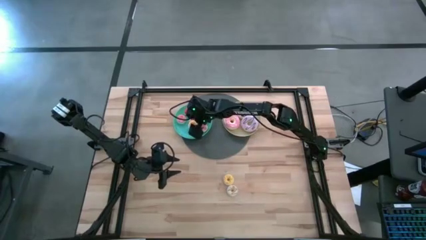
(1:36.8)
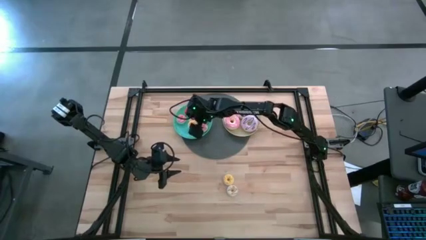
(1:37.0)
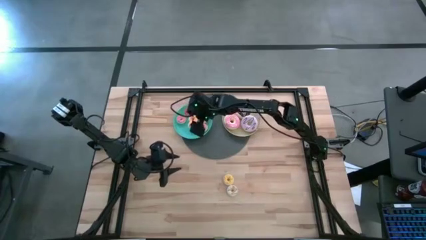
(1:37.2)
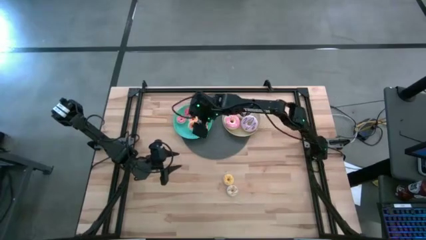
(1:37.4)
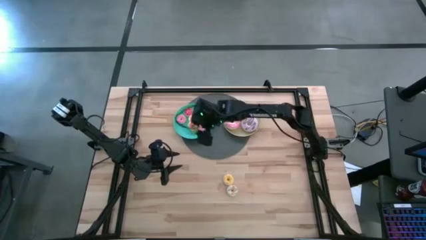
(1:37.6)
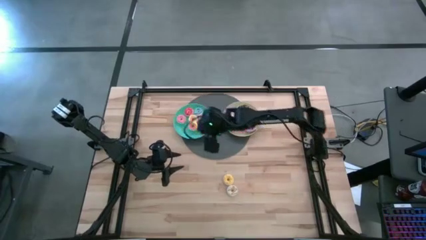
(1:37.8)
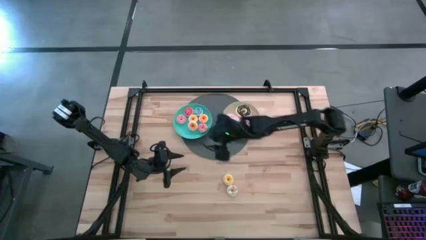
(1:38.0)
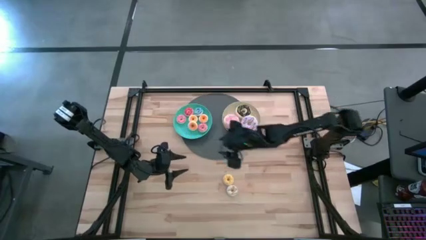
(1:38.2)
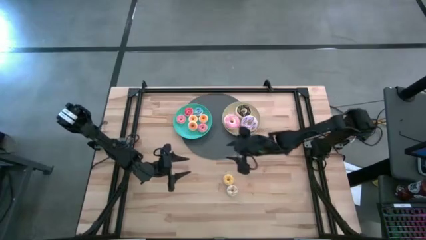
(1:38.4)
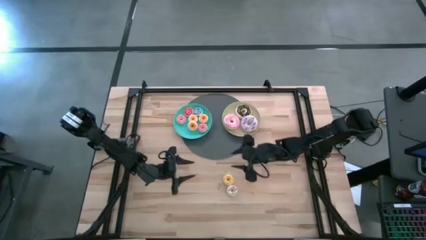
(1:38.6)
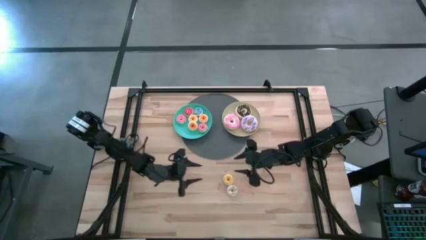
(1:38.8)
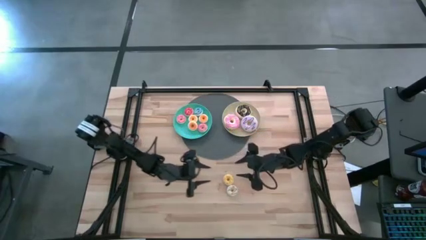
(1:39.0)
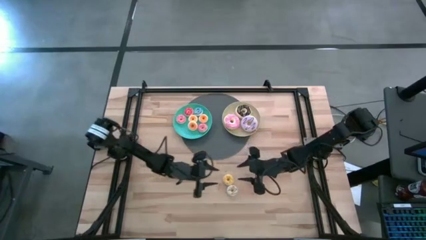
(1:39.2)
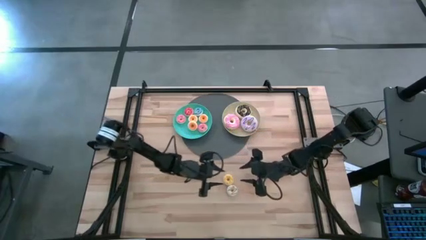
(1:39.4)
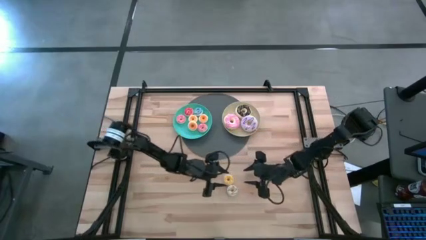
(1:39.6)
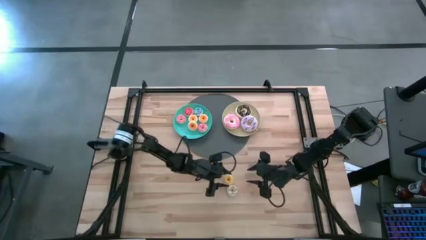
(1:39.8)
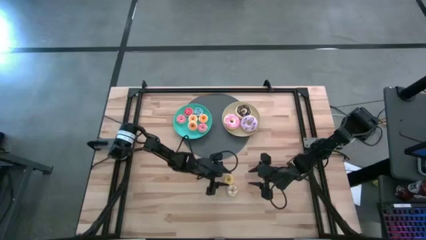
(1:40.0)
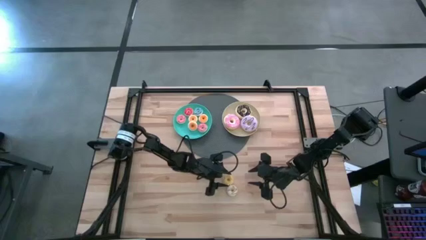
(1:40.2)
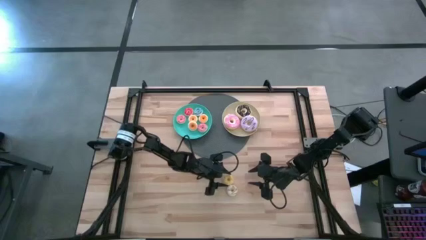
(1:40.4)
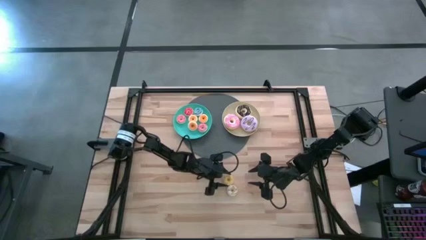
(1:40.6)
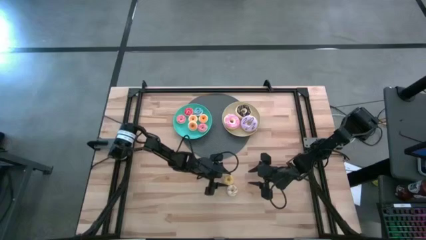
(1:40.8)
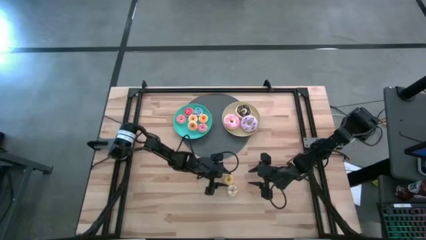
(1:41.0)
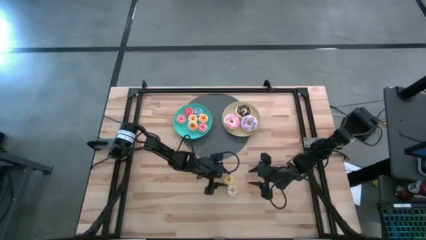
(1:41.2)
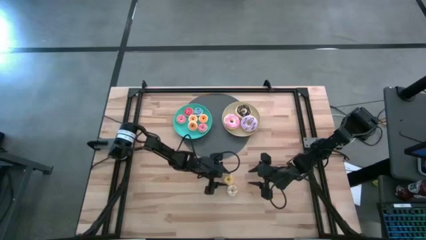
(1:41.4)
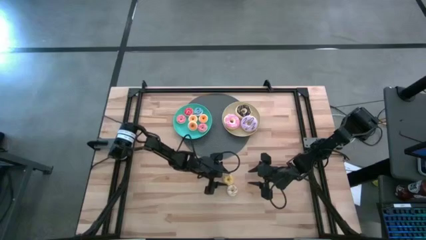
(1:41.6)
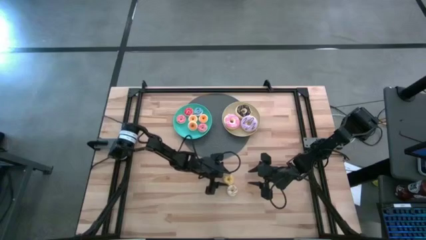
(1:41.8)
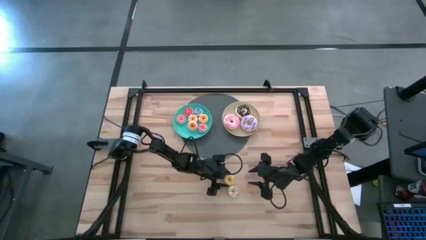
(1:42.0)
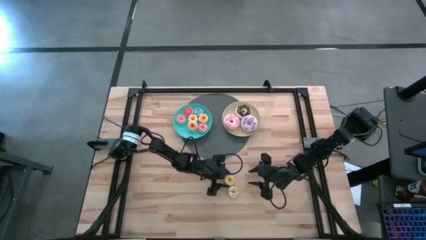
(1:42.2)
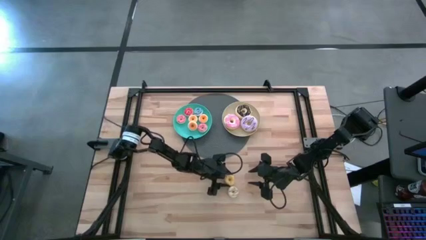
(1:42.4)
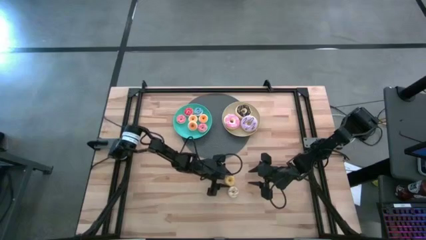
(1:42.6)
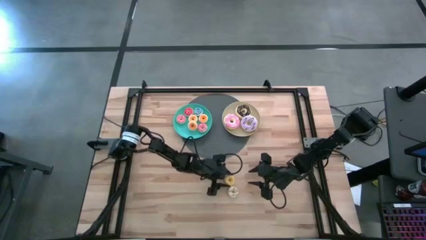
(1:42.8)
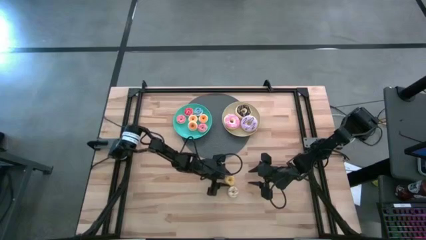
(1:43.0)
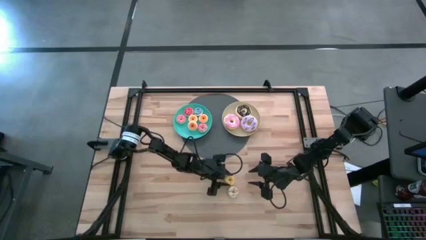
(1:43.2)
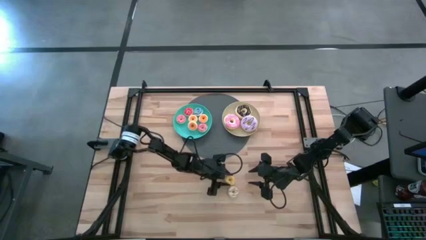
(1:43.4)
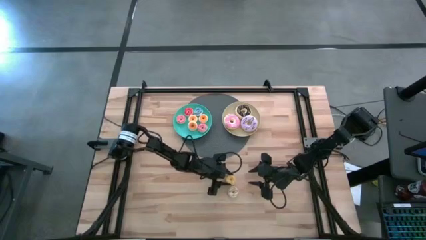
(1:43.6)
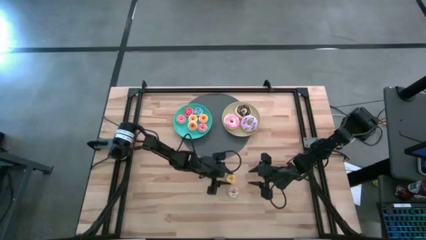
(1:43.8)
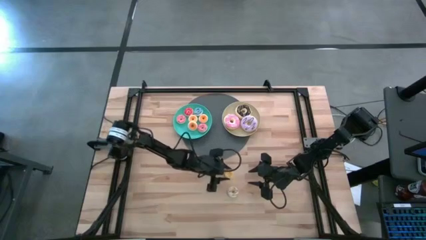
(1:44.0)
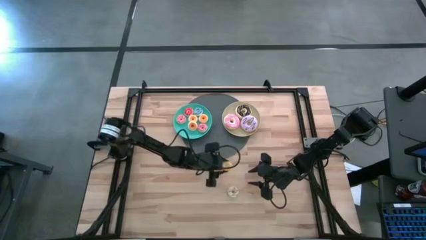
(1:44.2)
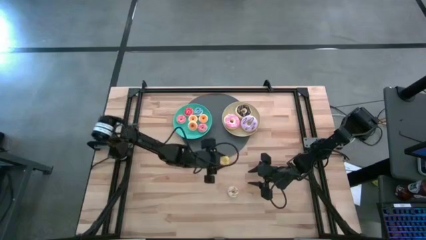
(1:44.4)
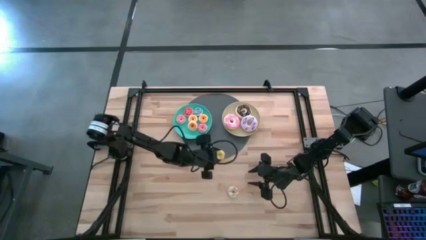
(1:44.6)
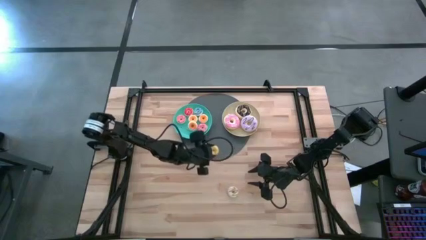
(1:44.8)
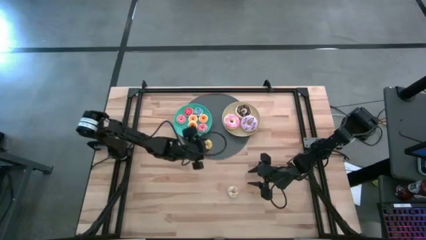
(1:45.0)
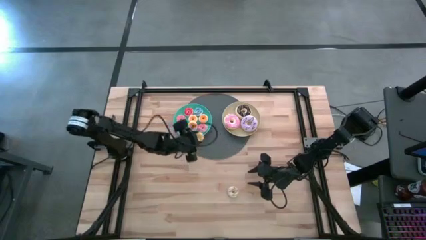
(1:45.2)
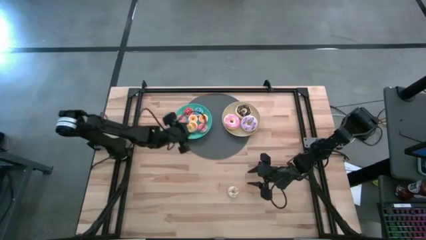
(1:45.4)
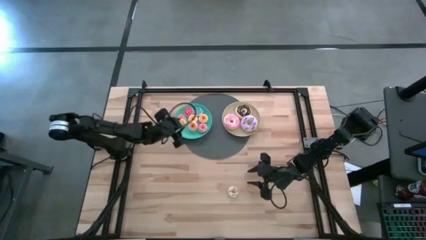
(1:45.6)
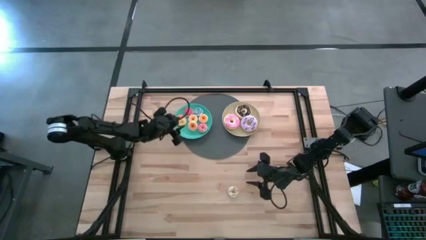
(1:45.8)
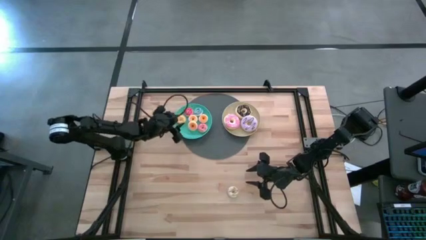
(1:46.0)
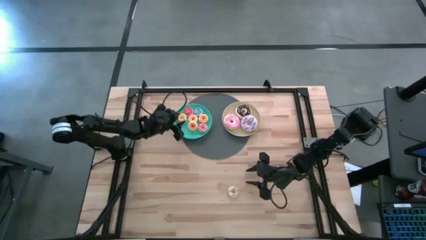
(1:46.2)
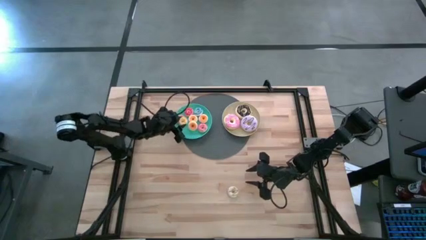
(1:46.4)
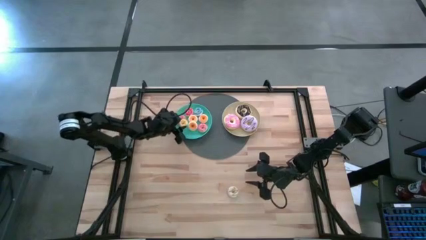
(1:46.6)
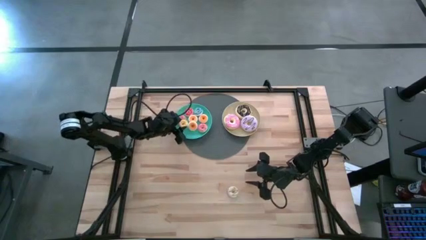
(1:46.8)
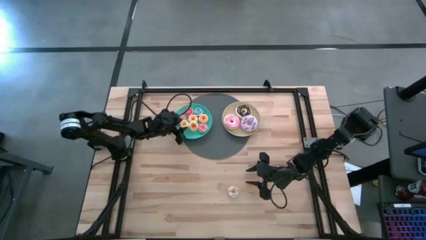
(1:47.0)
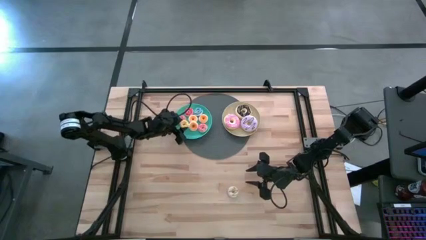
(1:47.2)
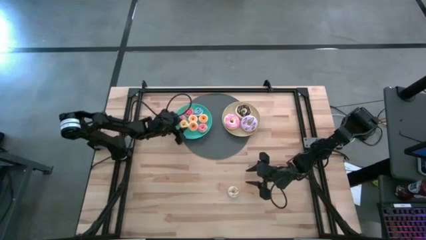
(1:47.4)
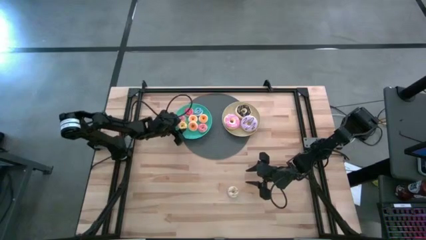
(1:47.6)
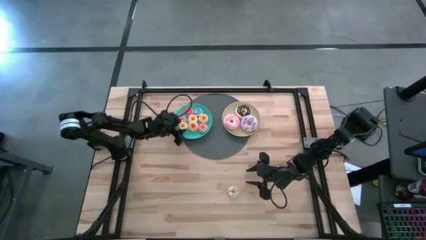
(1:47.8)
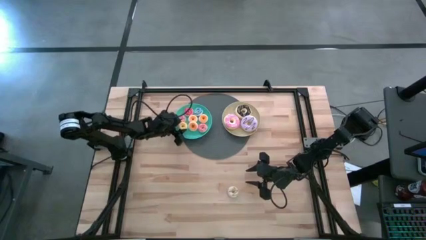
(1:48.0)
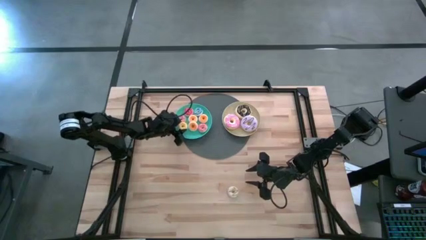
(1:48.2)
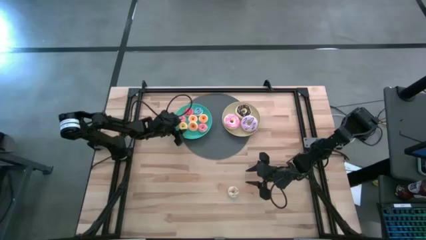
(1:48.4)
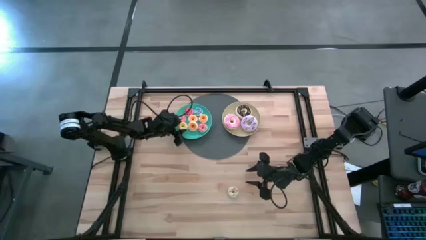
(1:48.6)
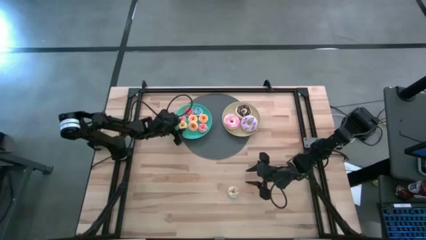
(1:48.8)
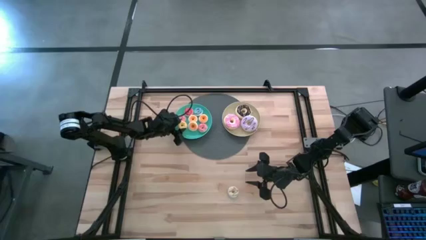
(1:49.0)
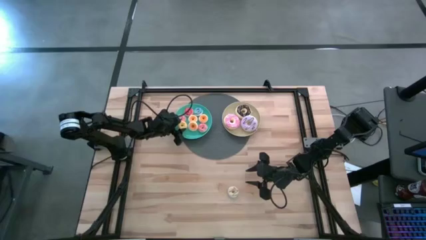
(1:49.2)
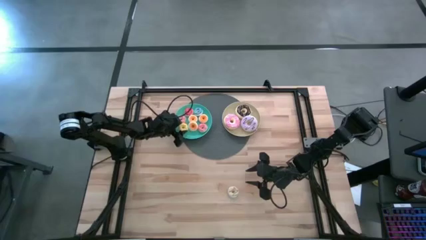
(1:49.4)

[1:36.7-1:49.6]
Task: Pick & Place donuts
Put the small yellow donut on the green plate

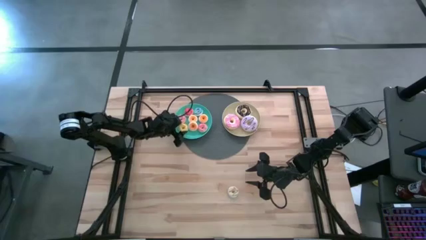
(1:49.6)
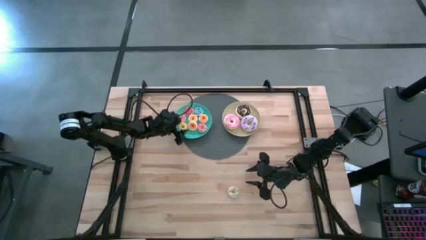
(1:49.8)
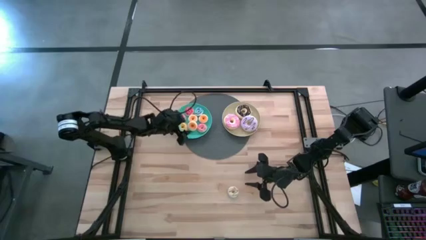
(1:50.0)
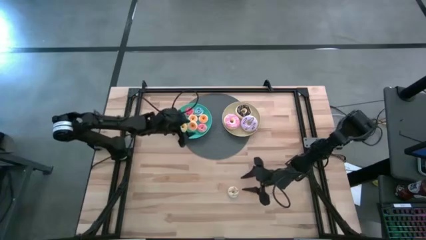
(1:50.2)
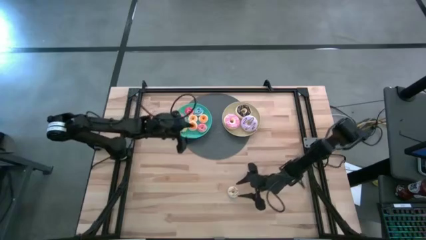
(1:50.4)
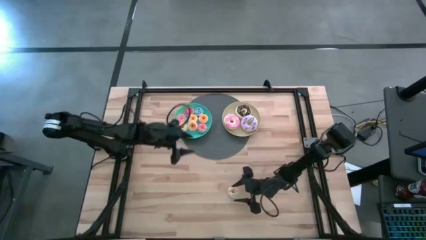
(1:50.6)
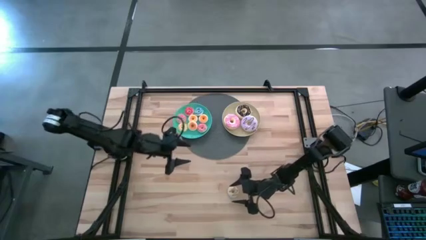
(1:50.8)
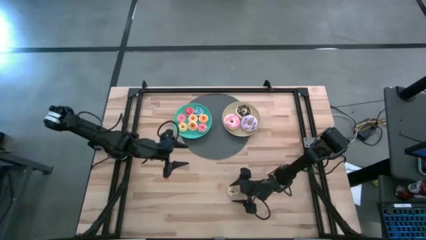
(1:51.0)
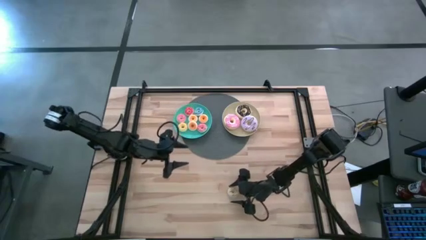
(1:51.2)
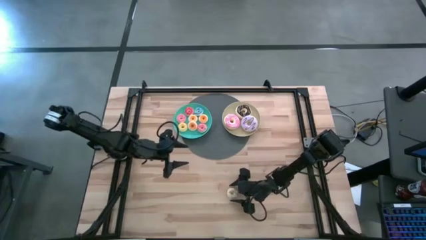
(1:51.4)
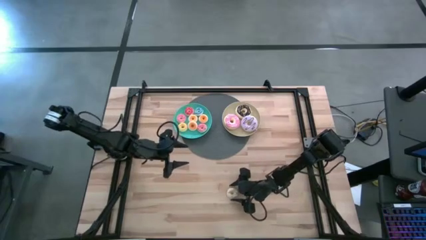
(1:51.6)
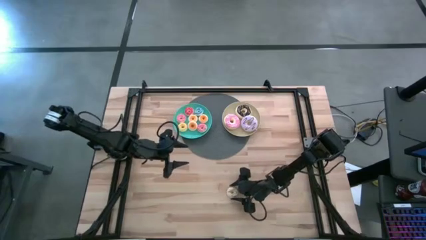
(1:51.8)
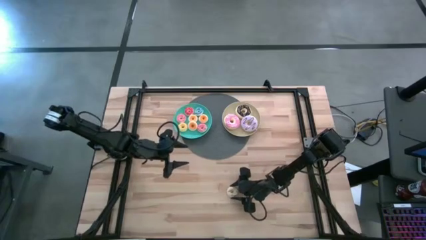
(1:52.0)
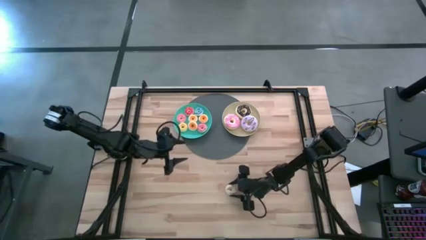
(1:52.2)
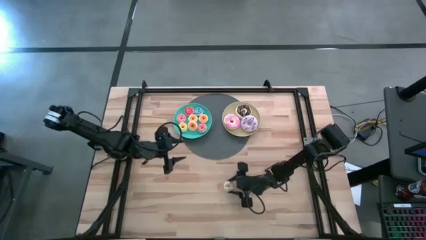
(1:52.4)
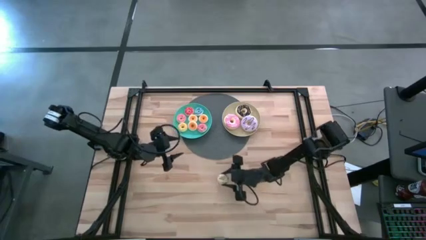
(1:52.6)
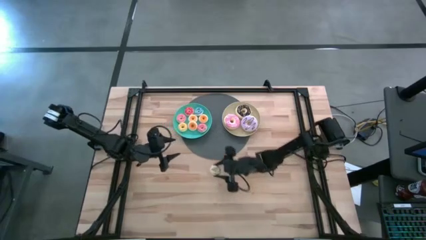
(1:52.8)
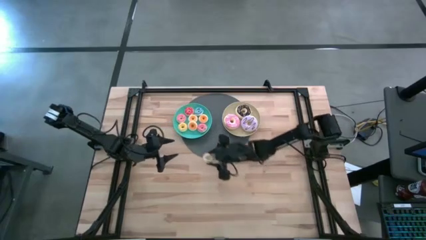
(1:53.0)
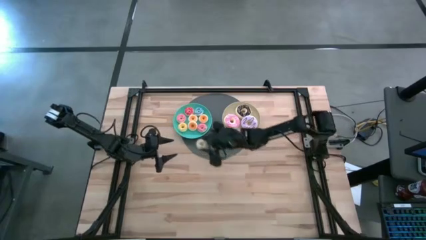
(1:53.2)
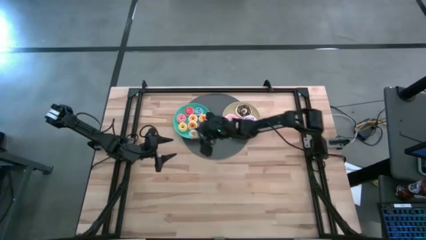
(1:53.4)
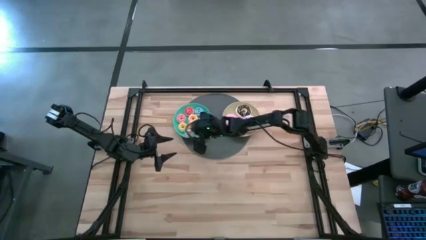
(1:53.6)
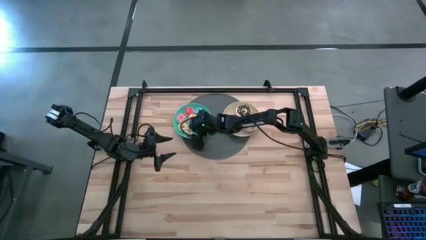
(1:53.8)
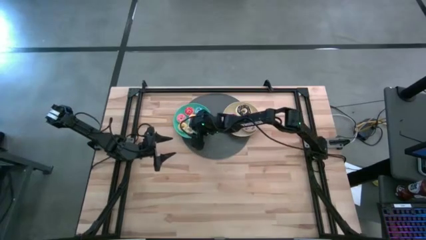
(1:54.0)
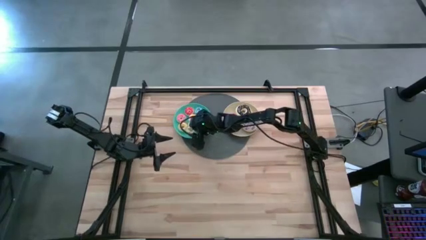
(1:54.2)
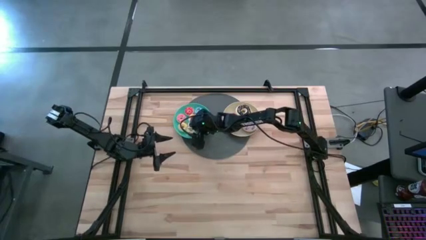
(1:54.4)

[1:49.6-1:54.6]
Put the small white donut on the green plate
